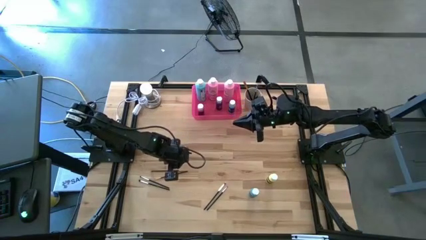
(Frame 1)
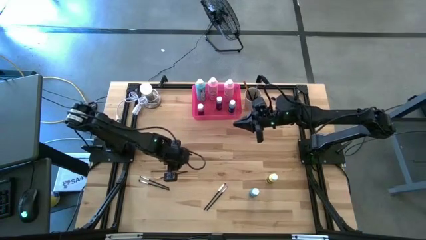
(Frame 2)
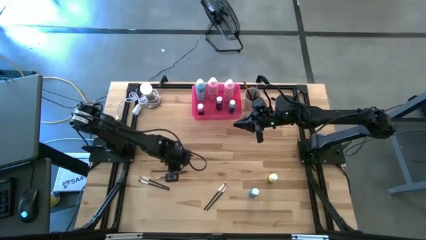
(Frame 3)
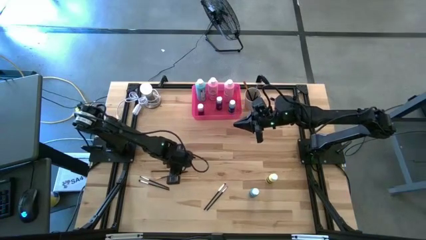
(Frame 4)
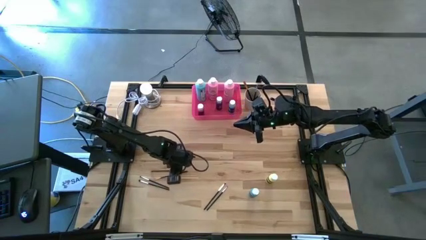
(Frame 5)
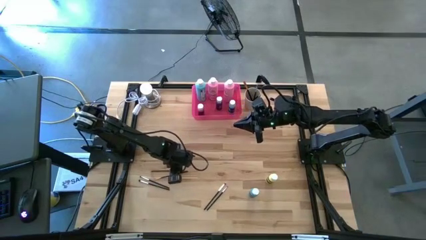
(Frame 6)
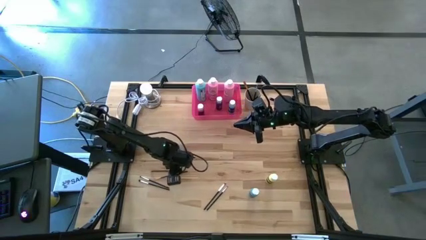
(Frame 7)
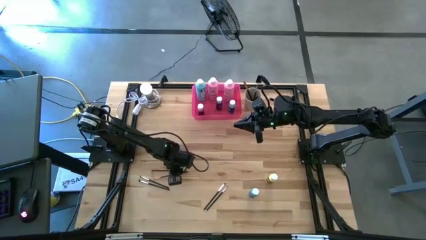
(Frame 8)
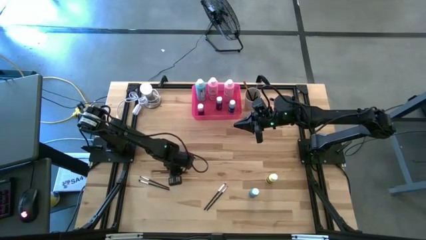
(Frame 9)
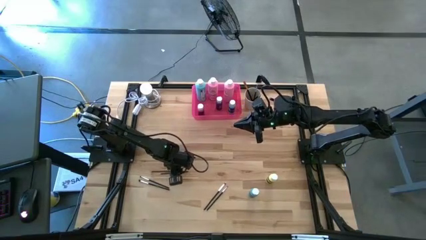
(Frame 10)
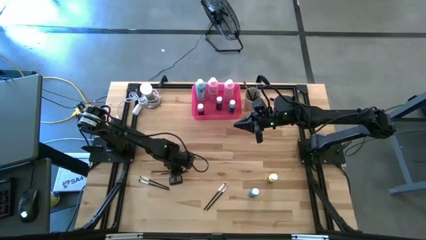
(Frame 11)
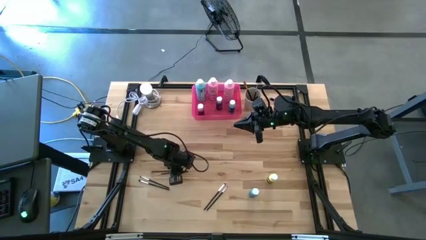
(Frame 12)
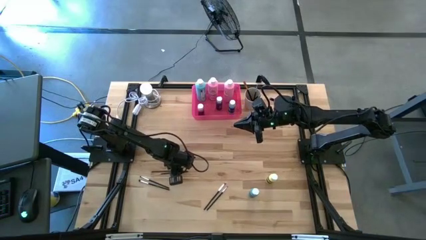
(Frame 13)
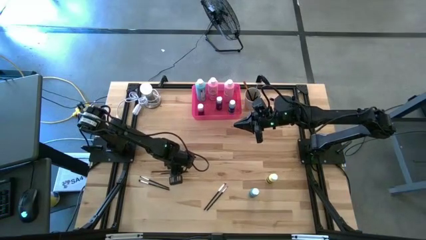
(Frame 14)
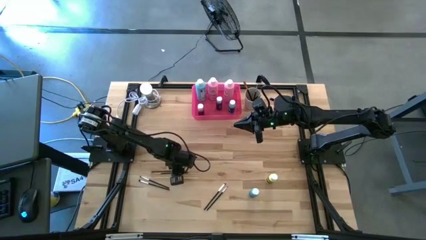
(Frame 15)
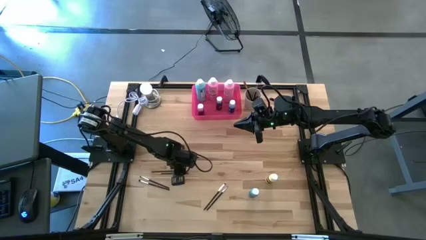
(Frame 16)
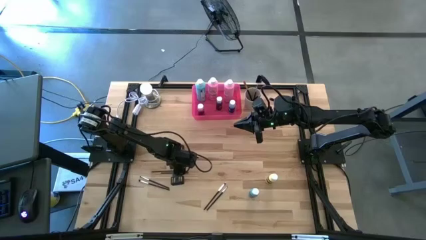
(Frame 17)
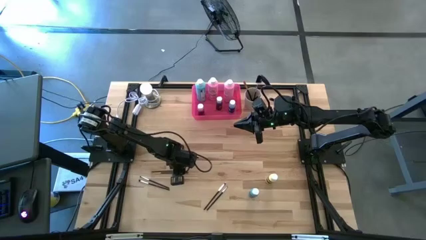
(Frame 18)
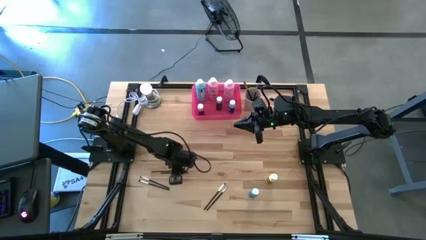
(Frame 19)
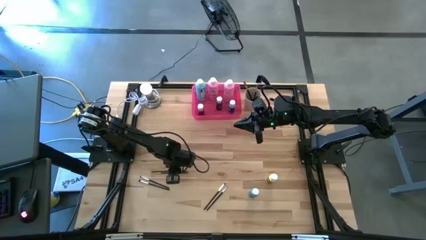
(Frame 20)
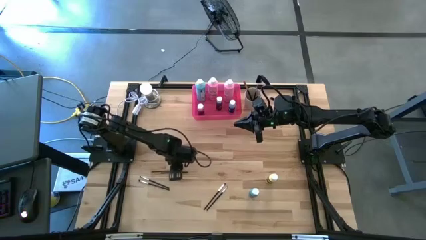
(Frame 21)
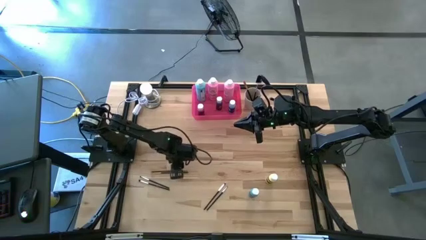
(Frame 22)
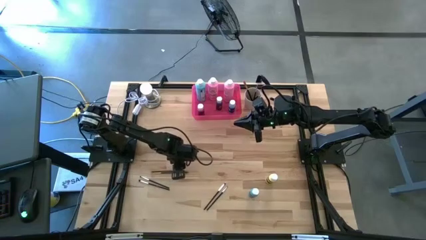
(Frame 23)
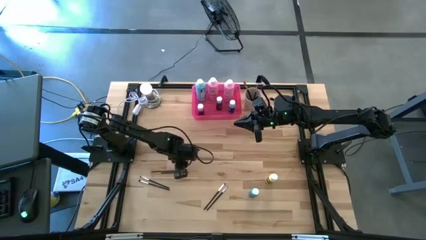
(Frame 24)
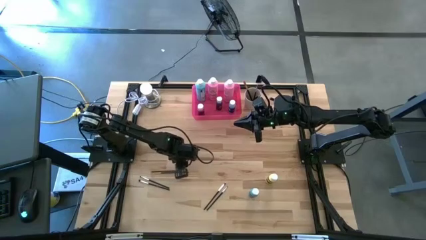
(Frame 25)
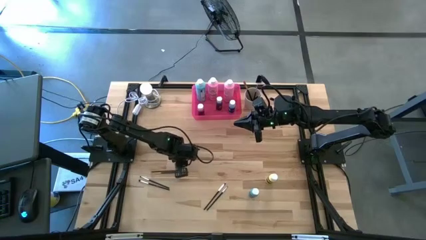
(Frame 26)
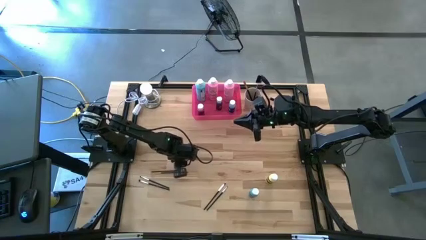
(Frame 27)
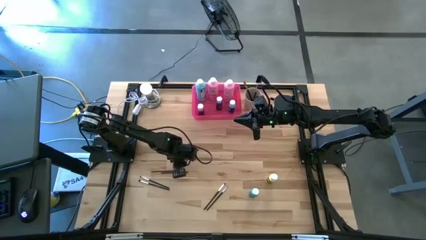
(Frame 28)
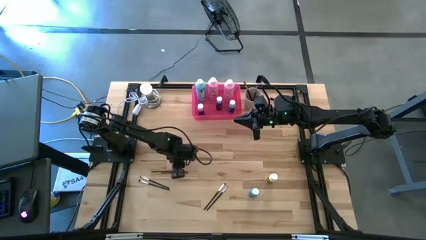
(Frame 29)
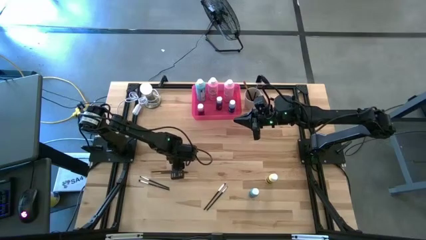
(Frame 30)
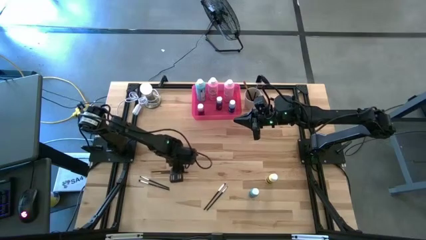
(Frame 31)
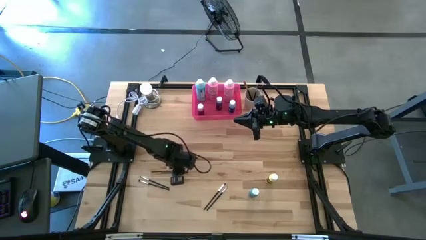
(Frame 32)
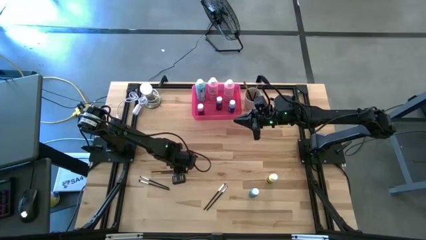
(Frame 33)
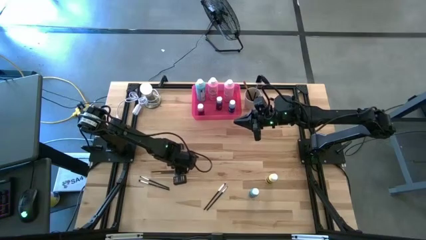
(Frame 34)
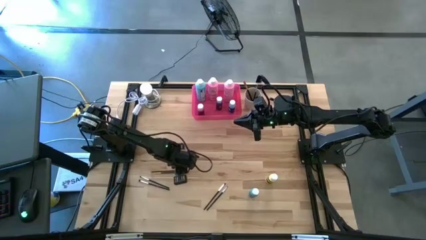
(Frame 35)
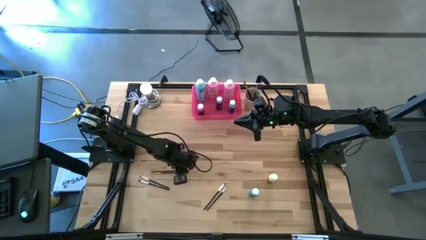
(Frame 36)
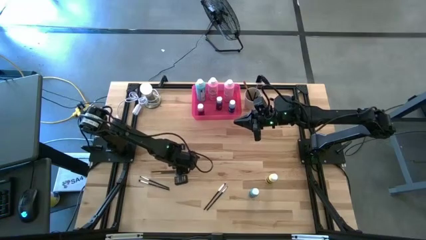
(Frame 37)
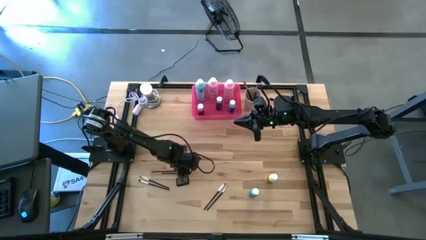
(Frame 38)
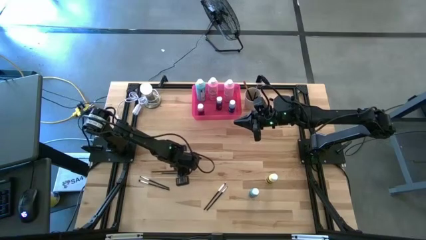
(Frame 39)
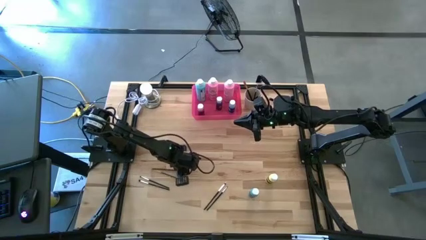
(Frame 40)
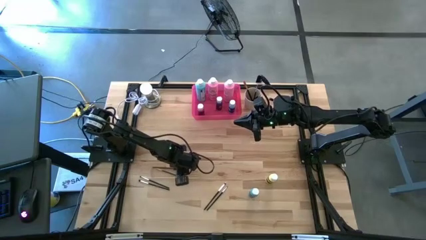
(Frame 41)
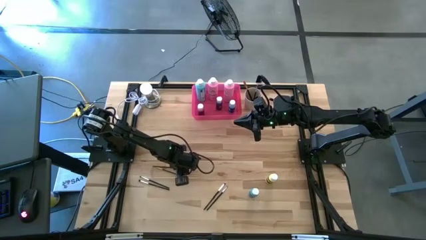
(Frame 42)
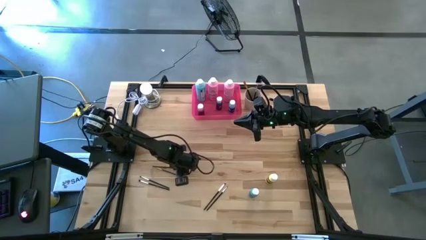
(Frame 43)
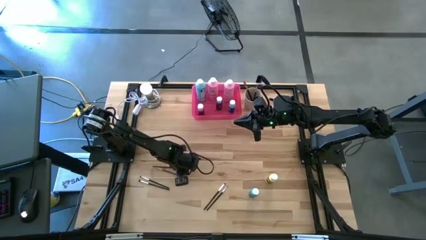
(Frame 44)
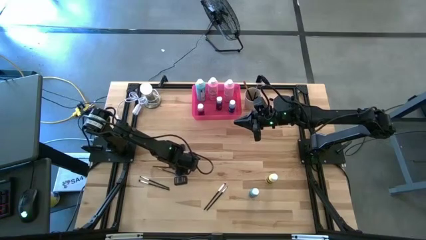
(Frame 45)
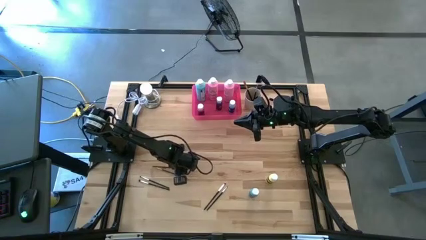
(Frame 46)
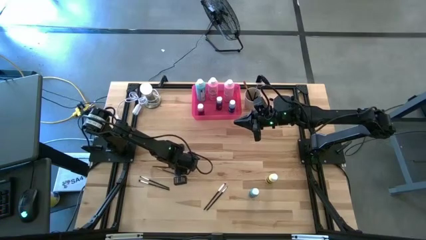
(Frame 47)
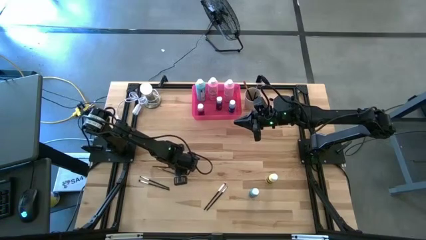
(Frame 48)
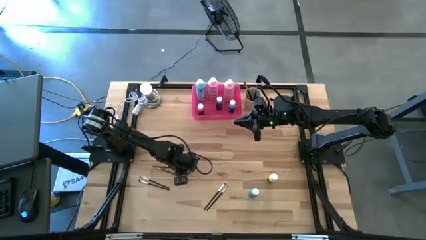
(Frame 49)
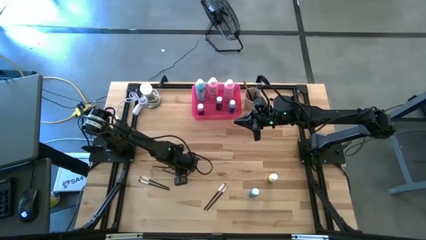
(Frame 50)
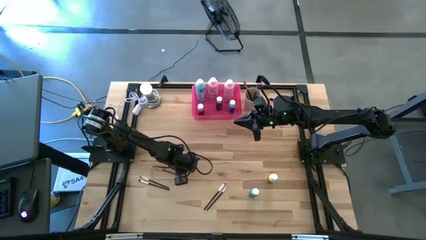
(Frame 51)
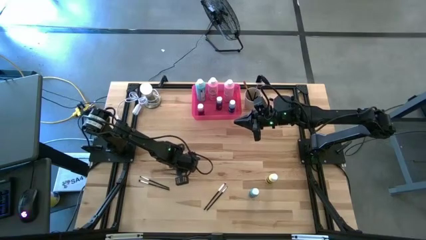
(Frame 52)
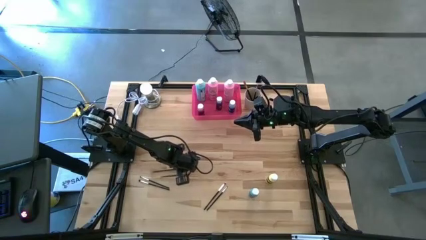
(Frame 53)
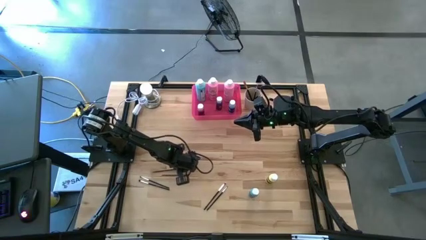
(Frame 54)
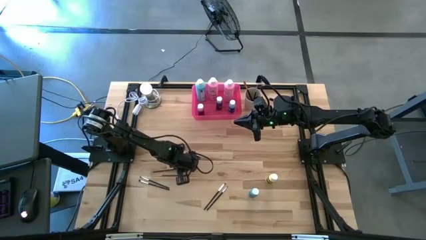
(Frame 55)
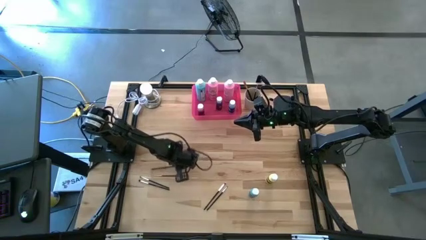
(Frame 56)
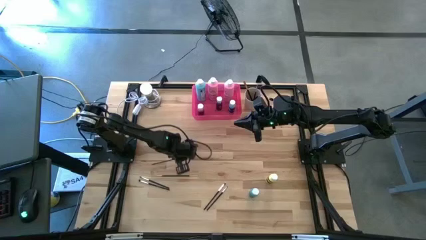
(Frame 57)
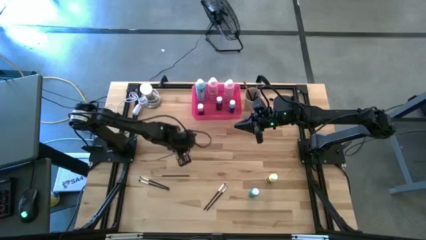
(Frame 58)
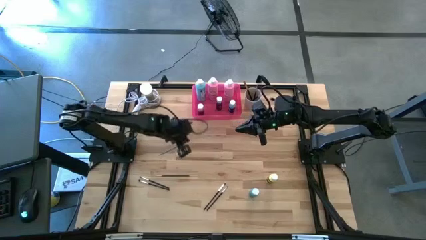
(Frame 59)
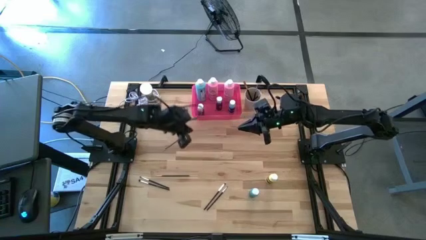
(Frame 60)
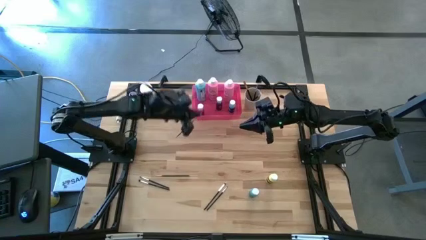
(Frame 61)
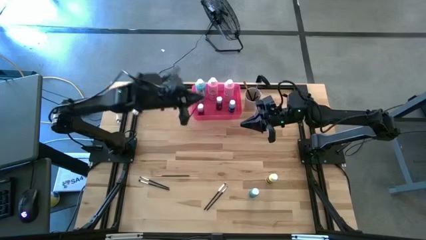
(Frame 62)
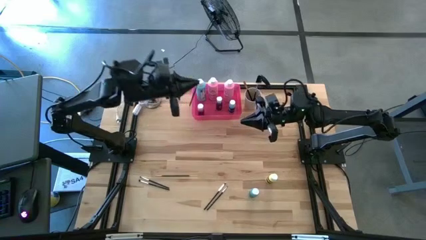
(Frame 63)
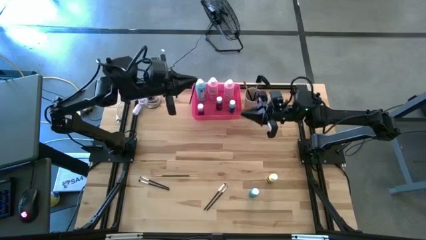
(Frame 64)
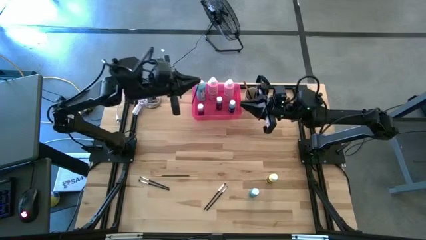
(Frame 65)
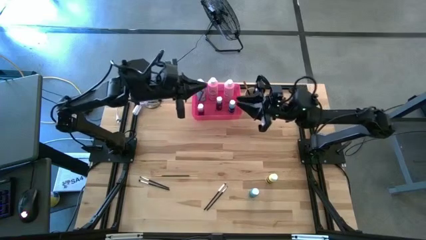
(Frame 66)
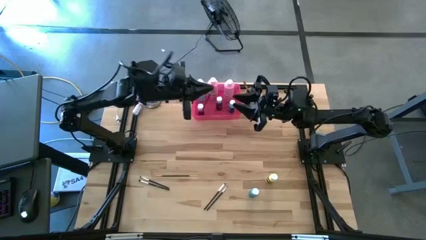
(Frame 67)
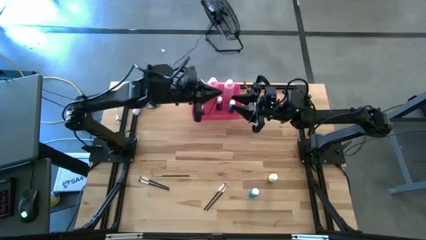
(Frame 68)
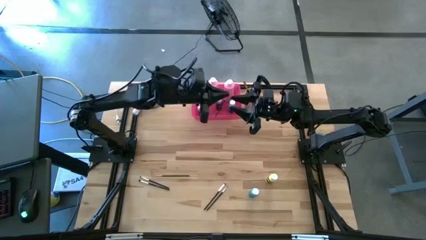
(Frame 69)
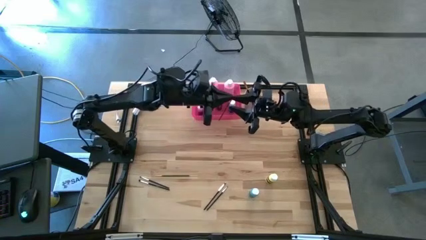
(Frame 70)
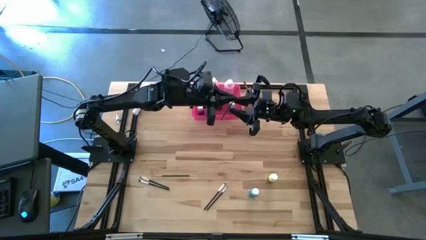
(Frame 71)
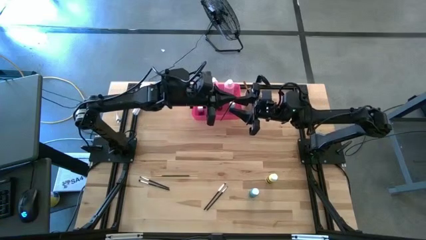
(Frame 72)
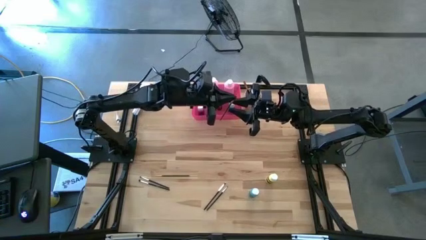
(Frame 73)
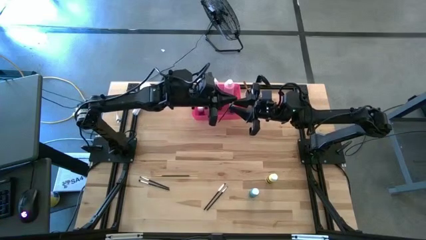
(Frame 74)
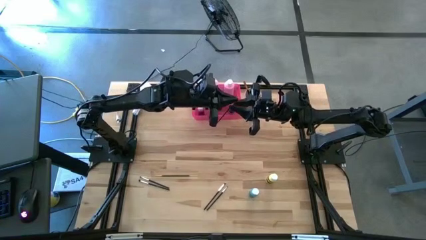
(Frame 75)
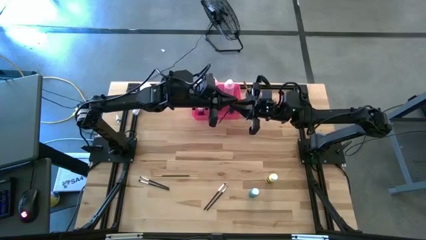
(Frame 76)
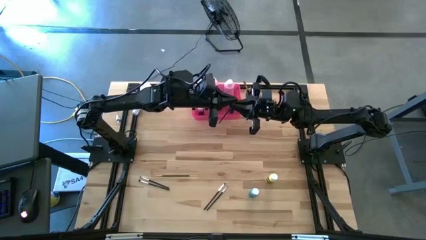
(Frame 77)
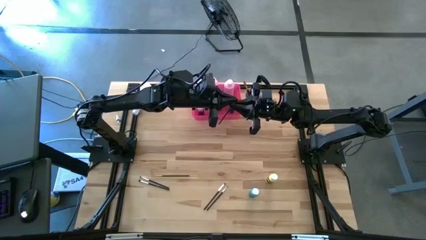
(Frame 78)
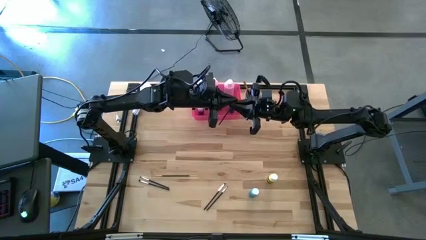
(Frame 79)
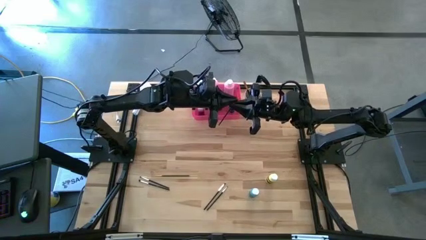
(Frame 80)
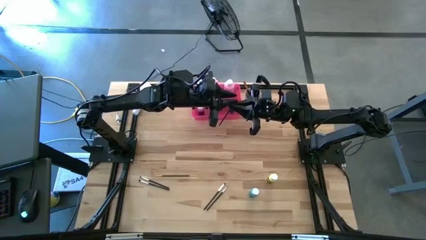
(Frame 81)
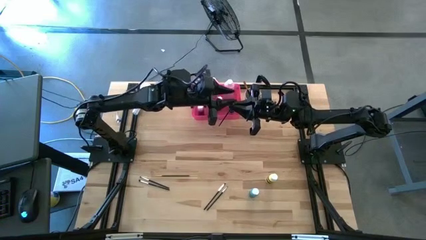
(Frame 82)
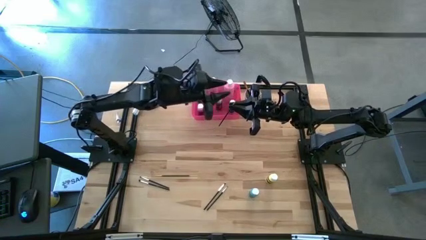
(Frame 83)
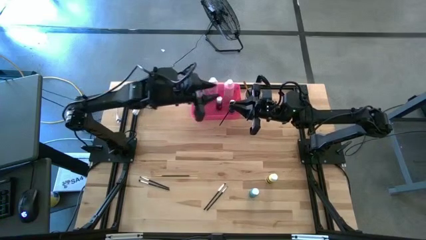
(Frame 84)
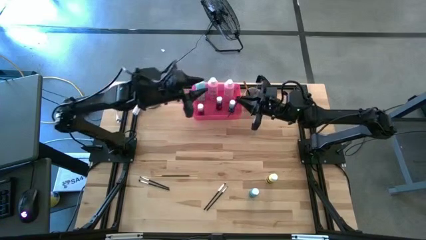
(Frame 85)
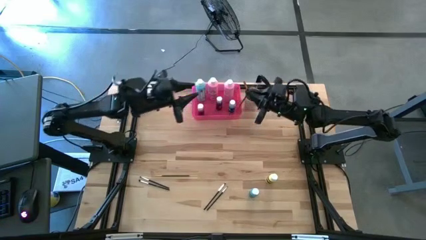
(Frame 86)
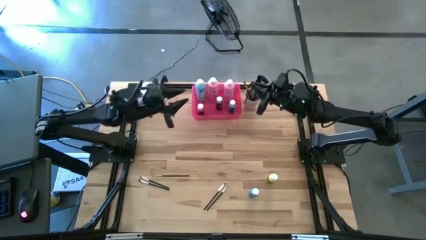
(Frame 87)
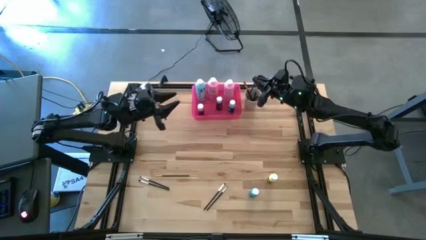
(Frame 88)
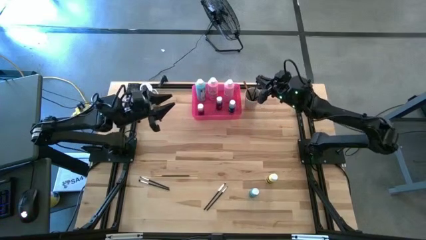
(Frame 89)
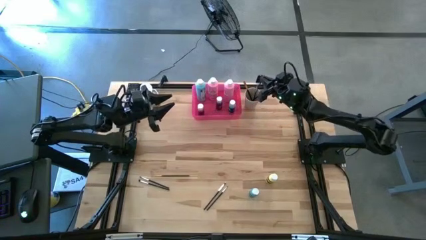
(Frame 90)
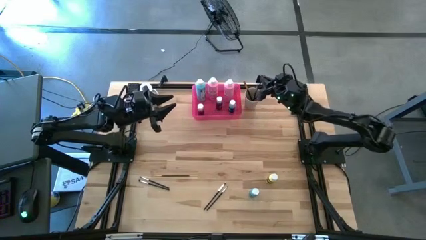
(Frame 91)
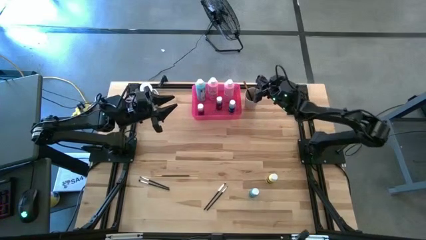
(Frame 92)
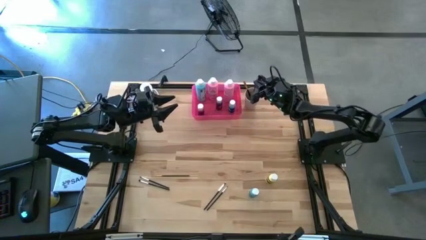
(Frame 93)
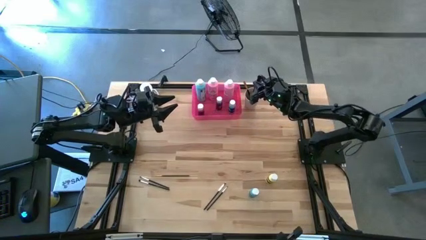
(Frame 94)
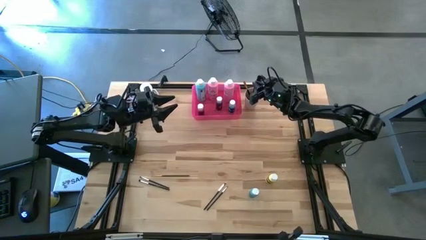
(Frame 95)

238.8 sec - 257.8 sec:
Task: Pick & Place Paint Supplies
Put the orange paintbrush into the white cup
